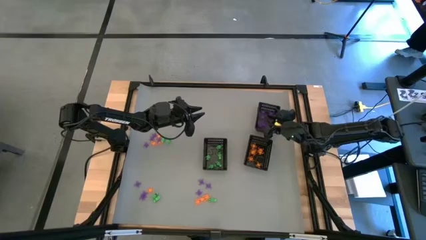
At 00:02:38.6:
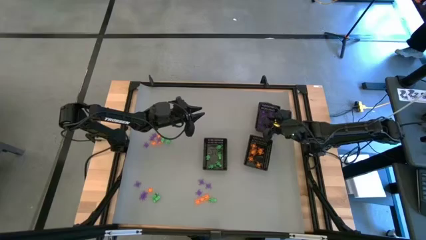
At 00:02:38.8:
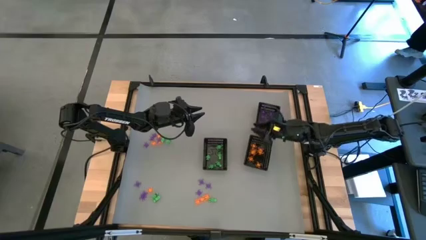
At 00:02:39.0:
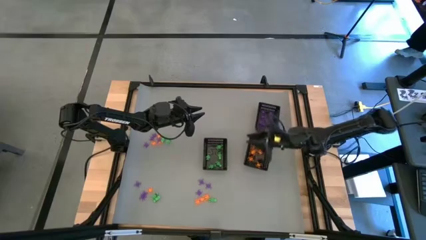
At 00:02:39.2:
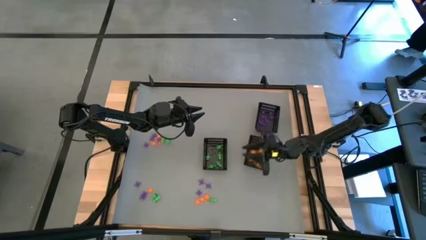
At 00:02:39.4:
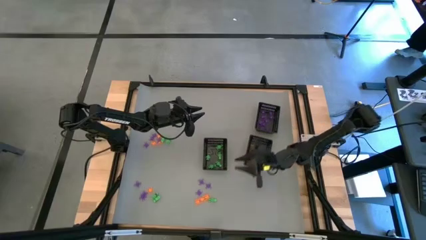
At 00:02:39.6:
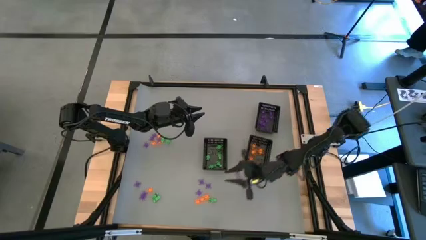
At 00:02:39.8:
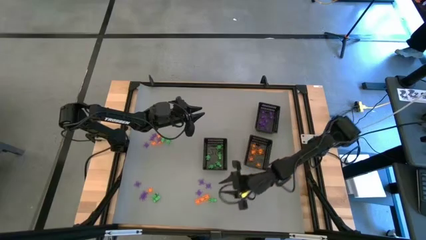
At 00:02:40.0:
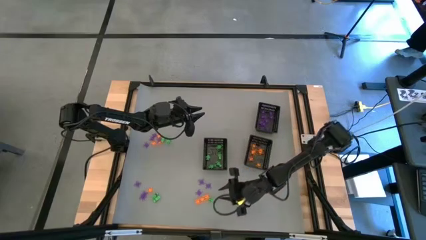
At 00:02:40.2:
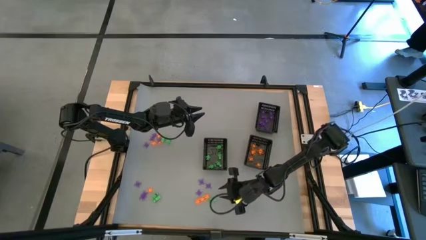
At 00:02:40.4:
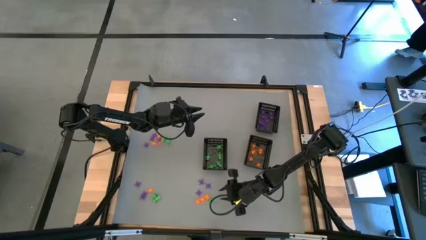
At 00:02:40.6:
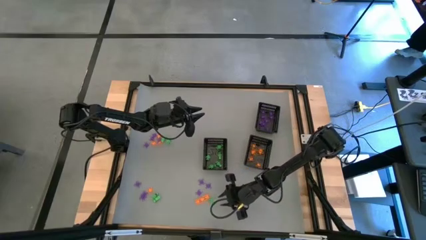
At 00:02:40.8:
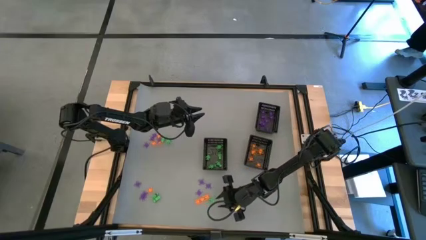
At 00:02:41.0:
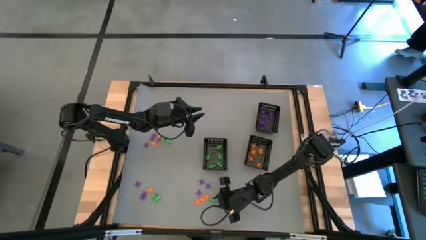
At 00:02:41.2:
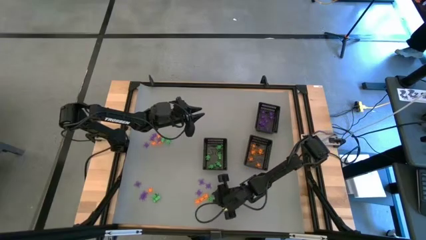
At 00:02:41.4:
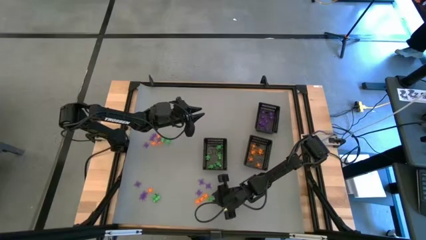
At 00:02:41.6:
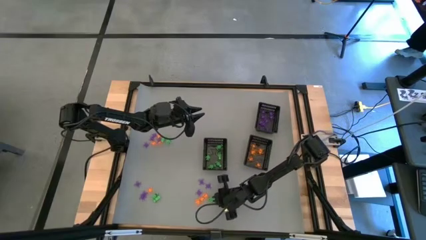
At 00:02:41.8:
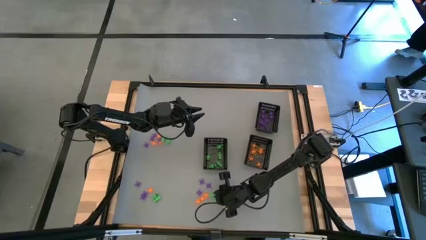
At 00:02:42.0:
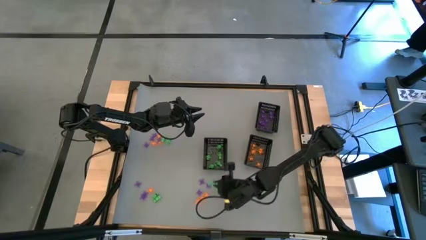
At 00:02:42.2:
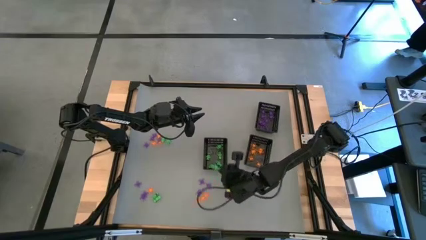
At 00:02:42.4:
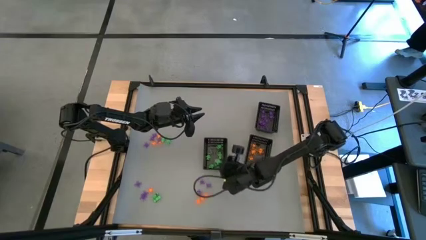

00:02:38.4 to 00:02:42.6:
Task: Sort Halloween decoration
Put the green skeleton toy into the bottom left bin

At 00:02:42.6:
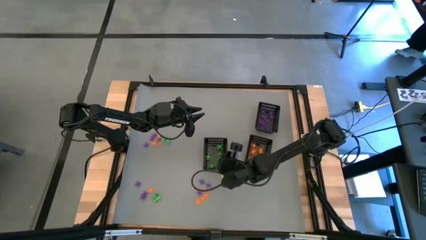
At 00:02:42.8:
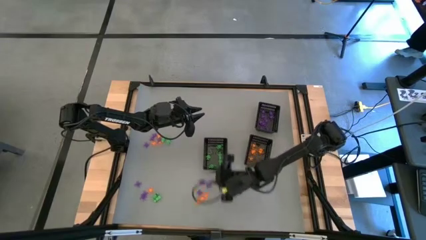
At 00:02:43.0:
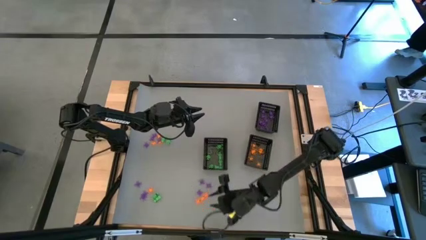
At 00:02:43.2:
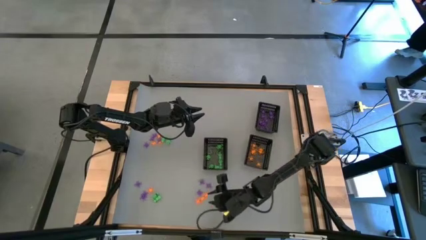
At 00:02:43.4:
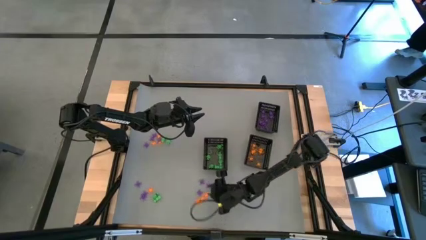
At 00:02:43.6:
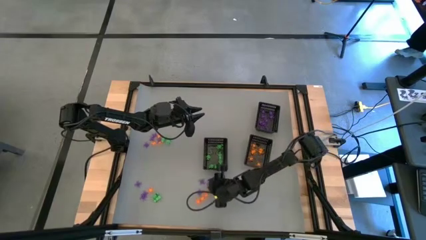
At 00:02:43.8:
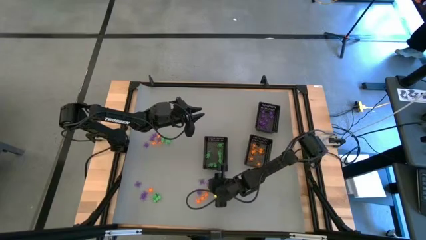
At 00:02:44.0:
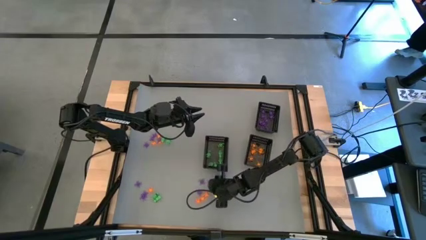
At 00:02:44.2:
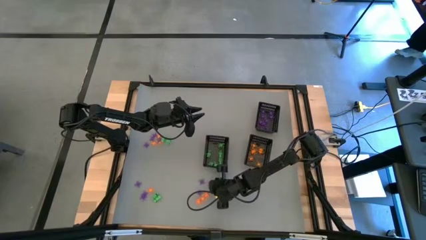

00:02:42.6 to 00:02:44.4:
Put the purple spider toy into the top bin

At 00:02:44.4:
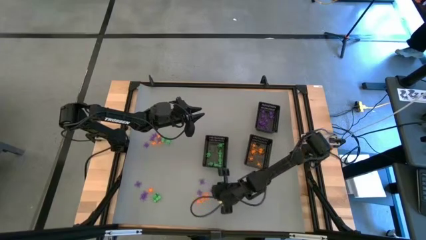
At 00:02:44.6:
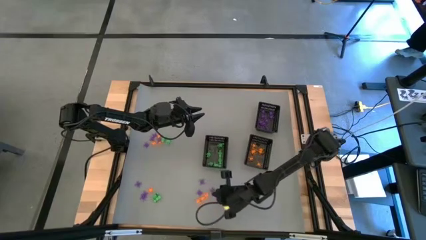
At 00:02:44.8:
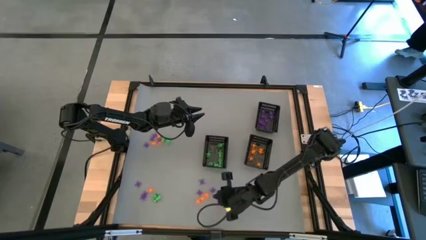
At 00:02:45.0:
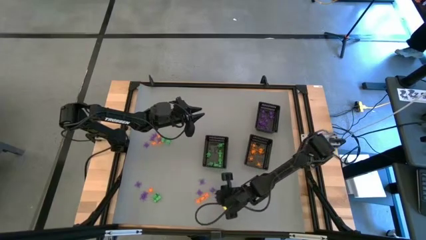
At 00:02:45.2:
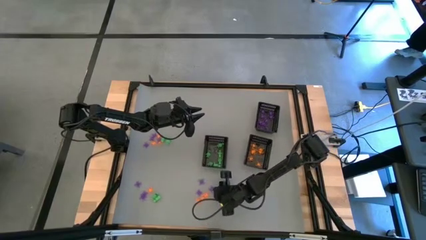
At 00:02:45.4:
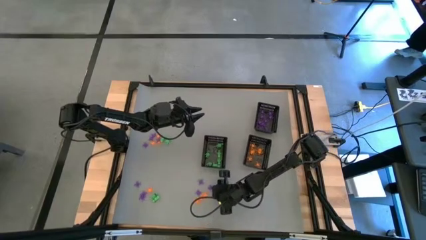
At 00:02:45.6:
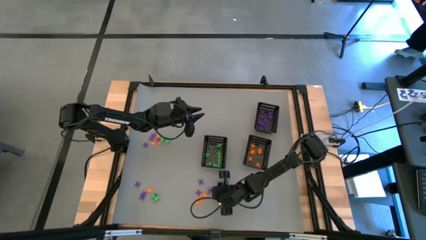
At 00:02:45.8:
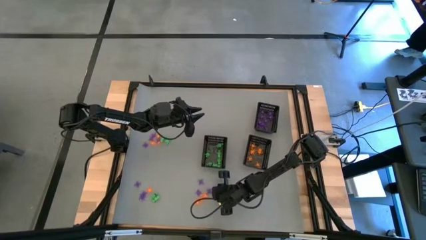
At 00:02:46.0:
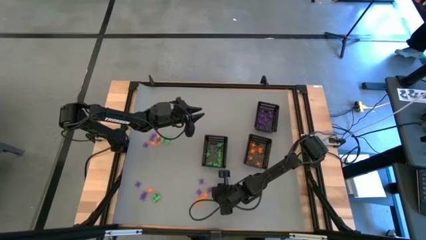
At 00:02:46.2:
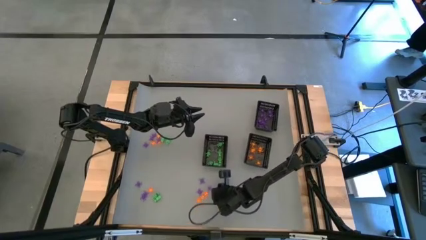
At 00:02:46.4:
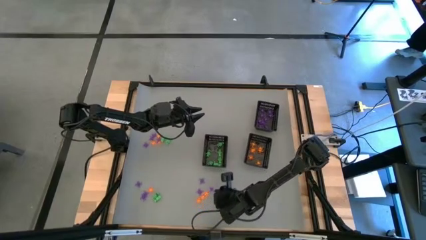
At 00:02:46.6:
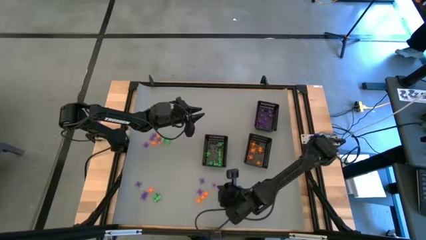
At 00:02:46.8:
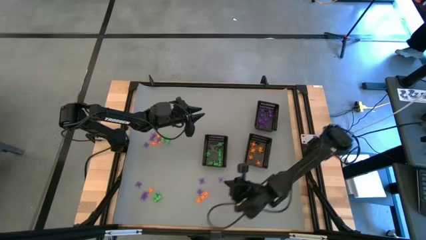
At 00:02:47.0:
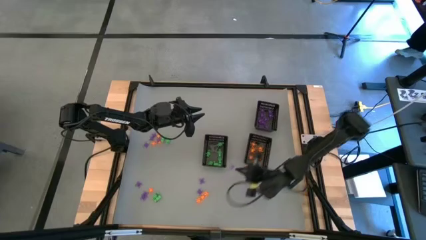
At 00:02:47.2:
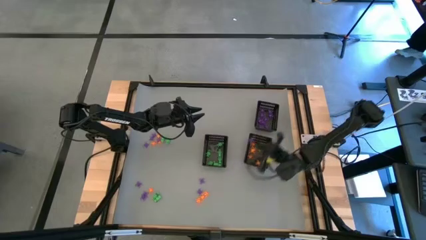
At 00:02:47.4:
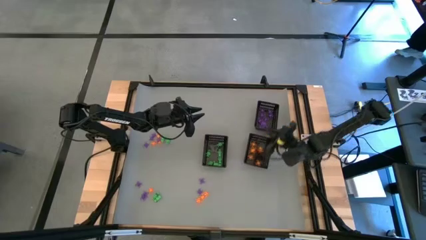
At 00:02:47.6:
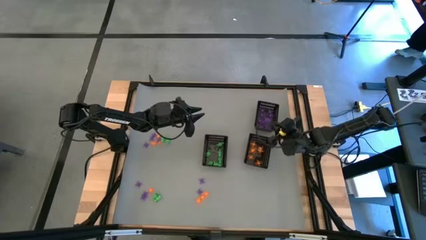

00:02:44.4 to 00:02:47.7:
Put the purple spider toy into the top bin

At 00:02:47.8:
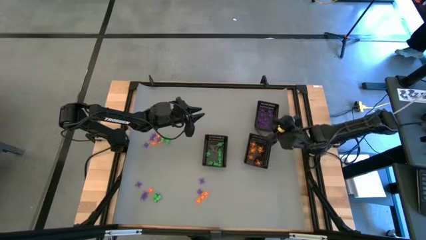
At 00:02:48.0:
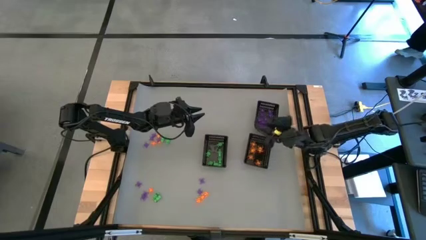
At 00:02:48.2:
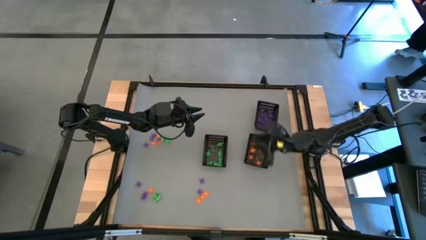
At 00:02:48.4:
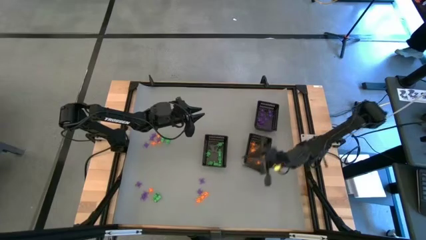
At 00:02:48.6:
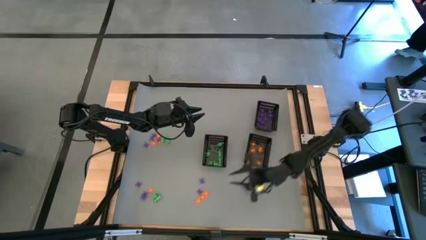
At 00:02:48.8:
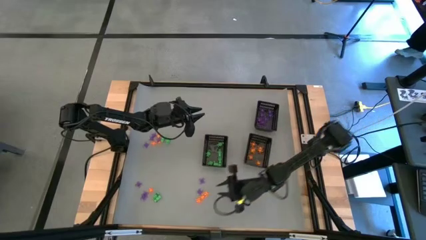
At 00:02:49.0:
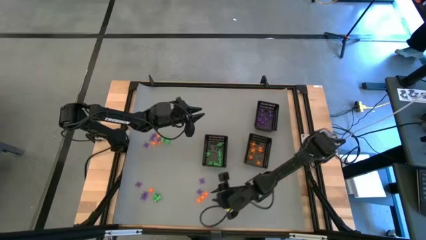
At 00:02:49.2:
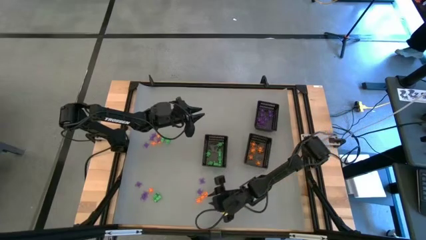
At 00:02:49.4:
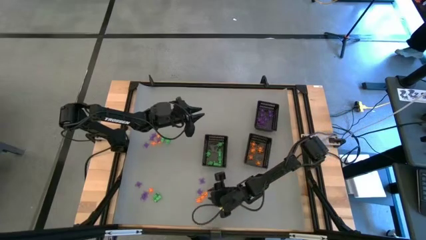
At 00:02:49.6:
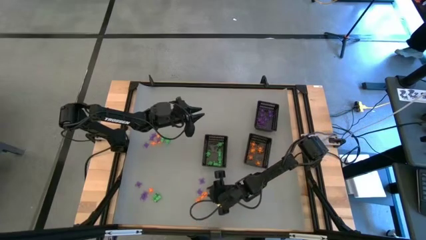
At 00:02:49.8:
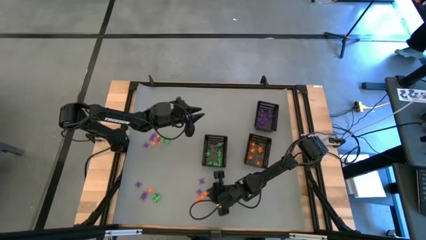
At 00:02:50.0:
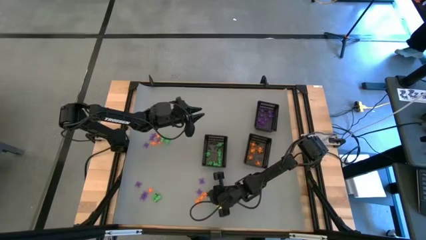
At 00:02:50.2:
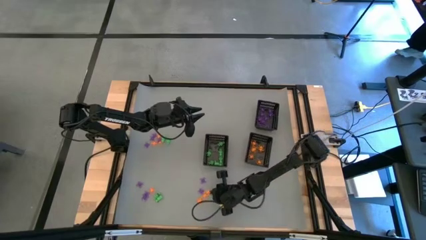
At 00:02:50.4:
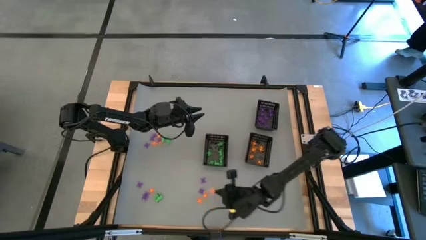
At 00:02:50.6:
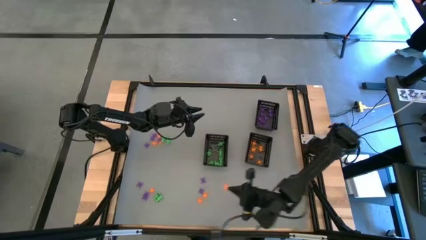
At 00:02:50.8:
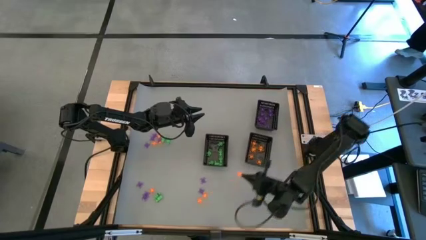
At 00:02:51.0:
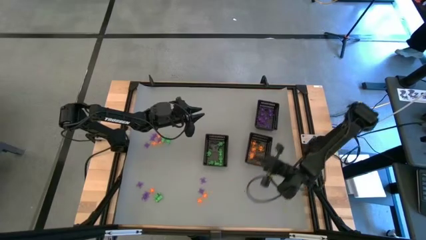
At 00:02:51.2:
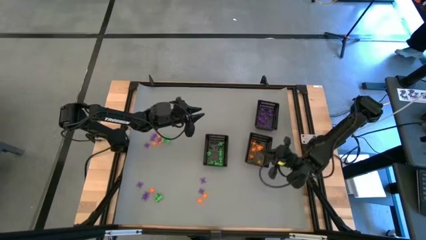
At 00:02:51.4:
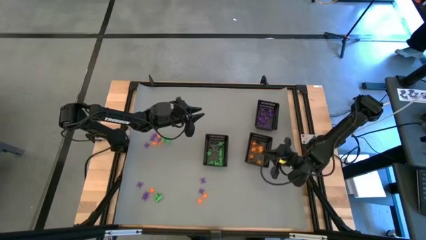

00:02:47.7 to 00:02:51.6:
Put the orange spider toy into the bottom right bin

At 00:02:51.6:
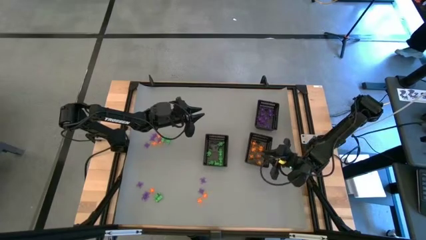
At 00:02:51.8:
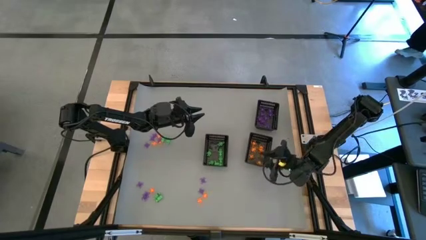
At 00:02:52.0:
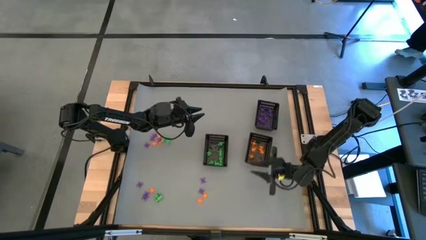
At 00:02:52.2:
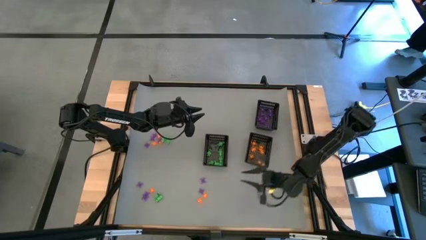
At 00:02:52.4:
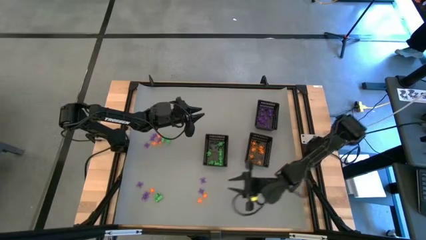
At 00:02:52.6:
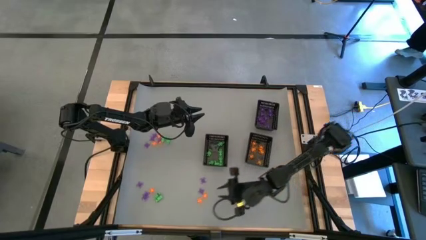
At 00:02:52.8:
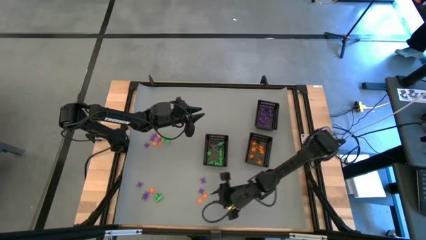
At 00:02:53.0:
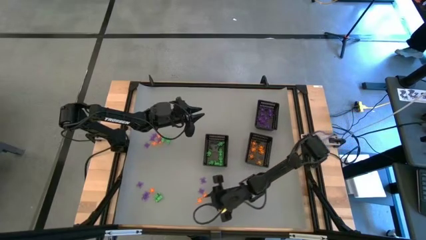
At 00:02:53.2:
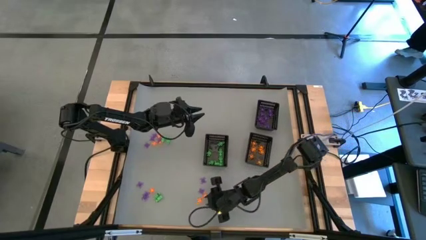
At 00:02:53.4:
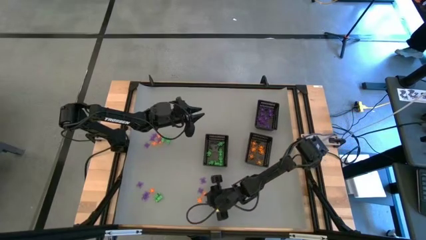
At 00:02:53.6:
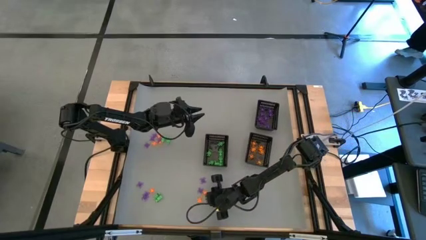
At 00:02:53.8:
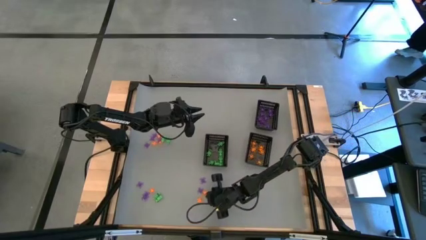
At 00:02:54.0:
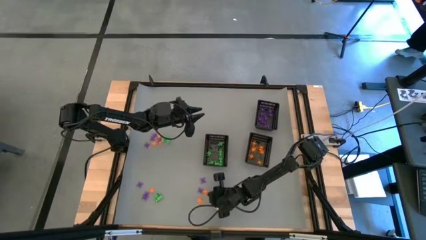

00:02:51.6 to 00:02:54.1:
Put the orange spider toy into the bottom right bin

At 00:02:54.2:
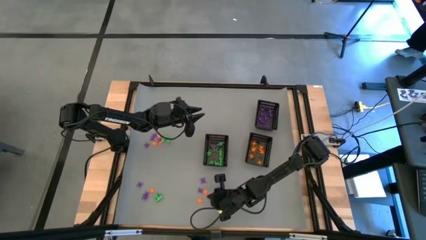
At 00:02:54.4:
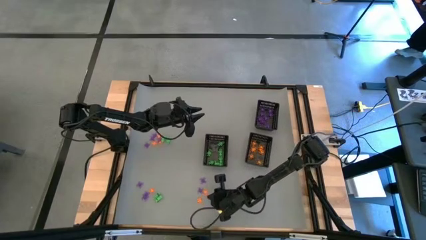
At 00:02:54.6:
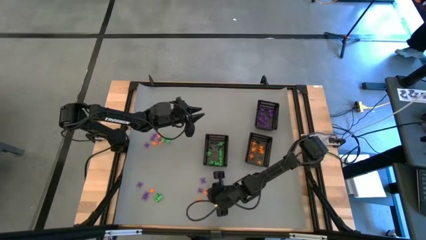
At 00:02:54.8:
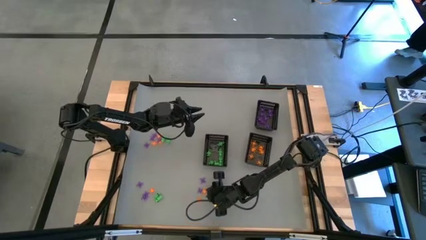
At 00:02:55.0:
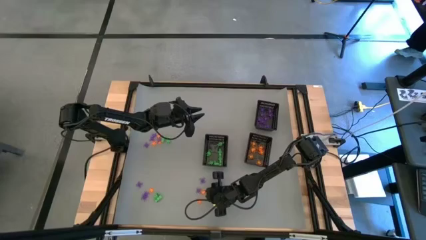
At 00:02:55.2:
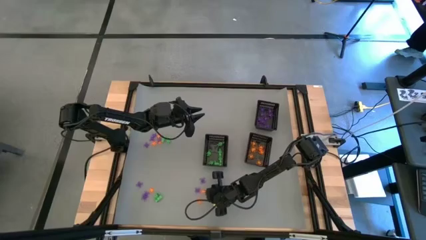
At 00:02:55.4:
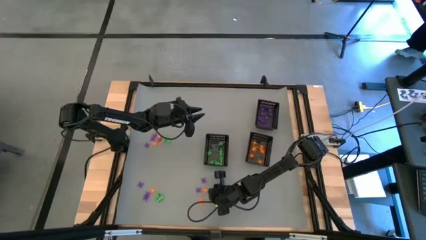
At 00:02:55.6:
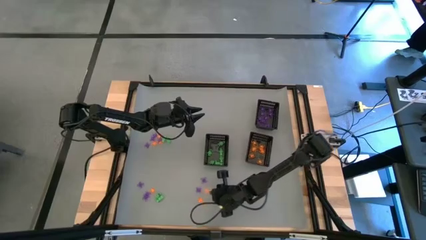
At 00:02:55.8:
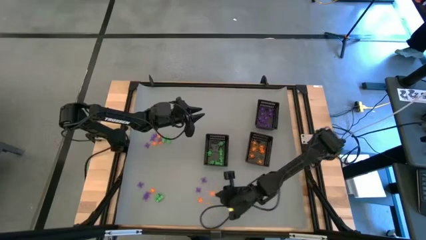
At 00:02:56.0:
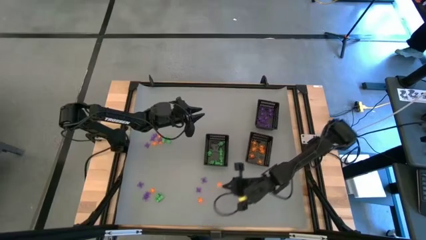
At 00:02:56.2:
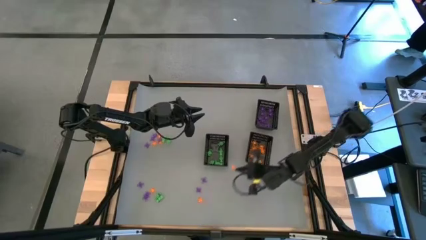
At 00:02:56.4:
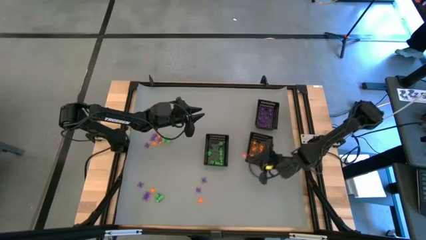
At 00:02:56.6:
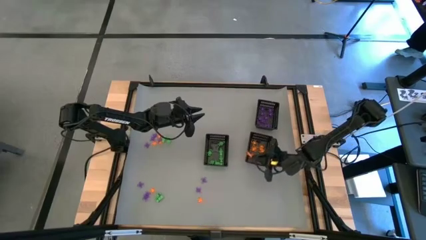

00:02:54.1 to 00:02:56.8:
Put the orange spider toy into the bottom right bin
